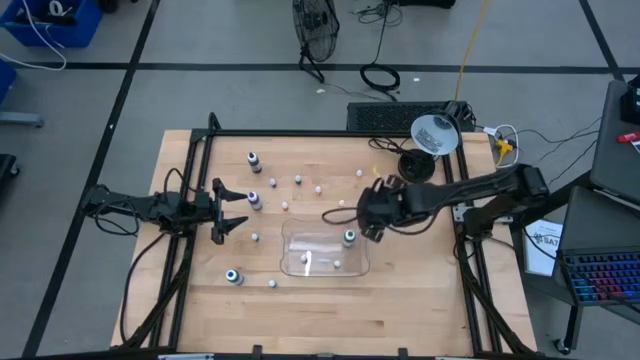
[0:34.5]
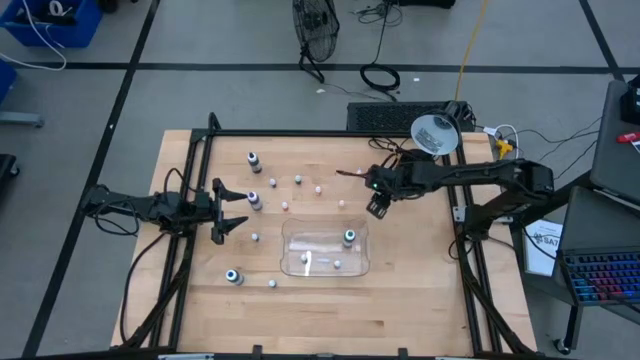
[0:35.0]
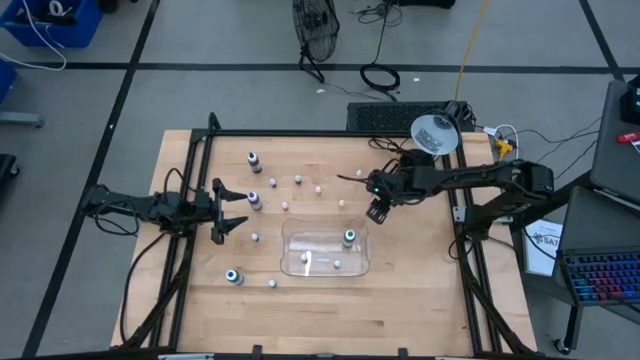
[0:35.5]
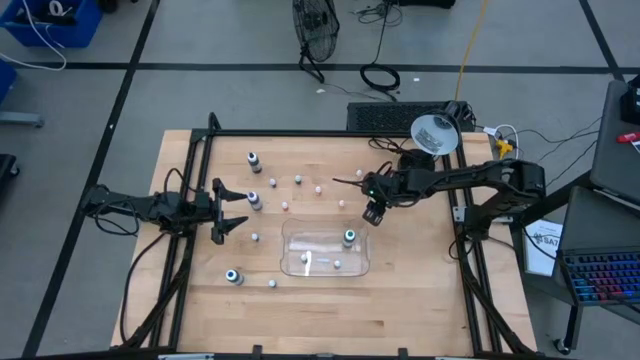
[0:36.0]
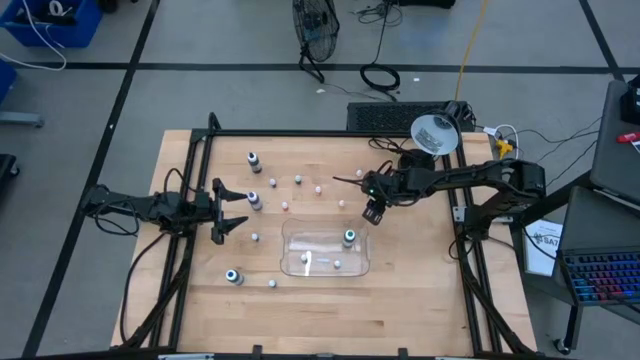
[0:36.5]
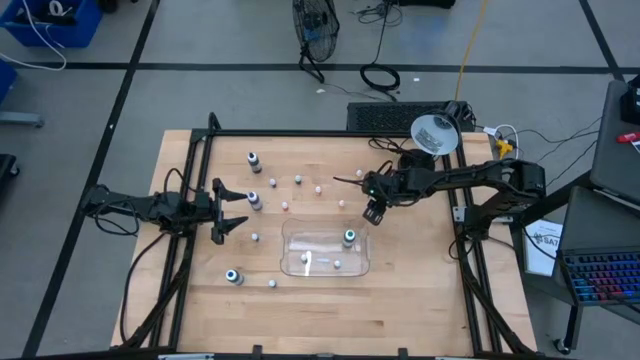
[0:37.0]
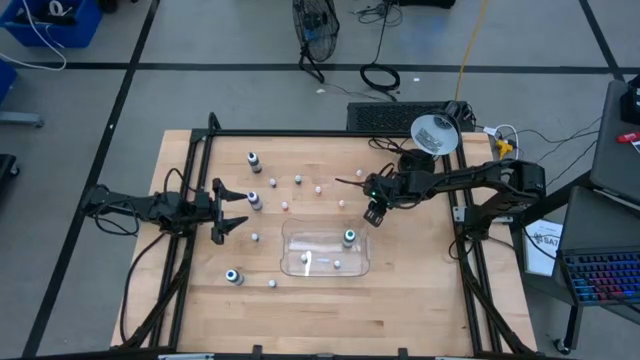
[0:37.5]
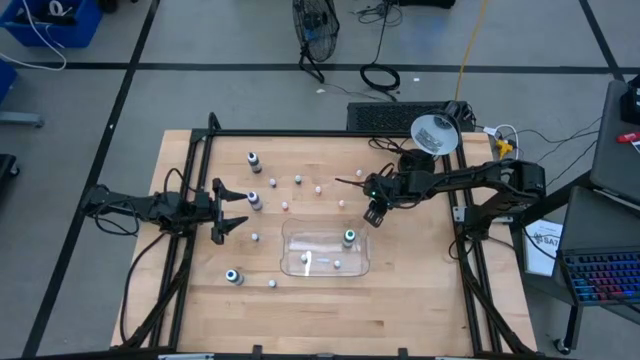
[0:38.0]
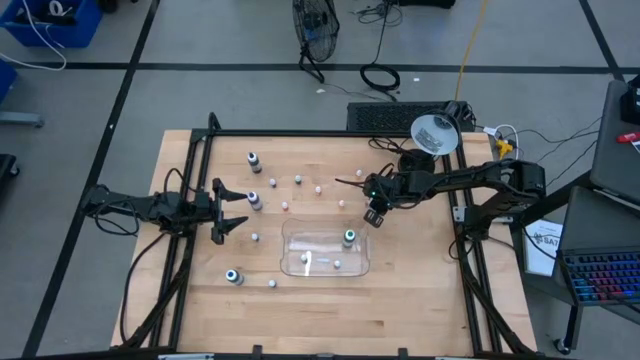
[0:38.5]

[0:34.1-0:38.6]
Task: Pick & Place food coloring
Put the small blue food coloring bottle into the bin

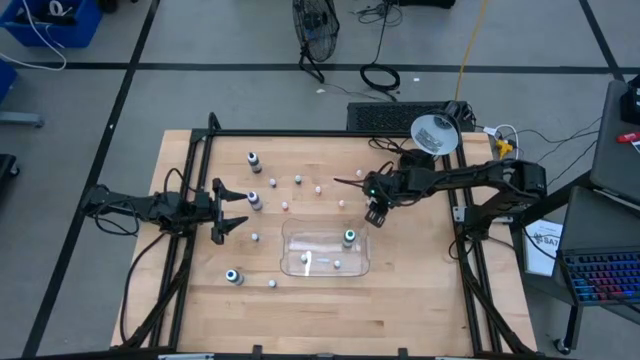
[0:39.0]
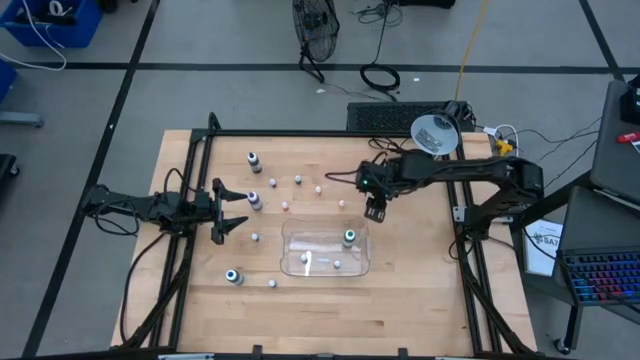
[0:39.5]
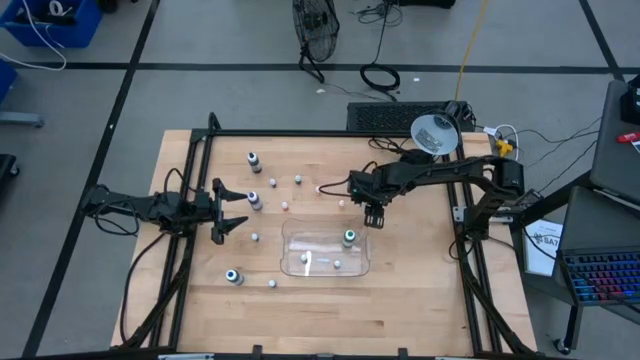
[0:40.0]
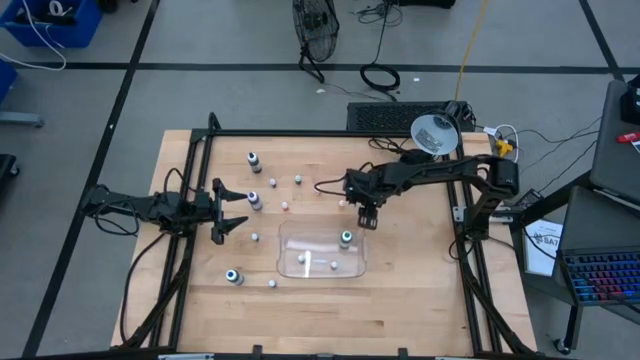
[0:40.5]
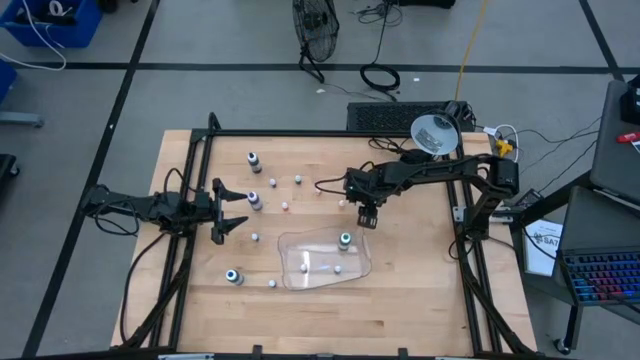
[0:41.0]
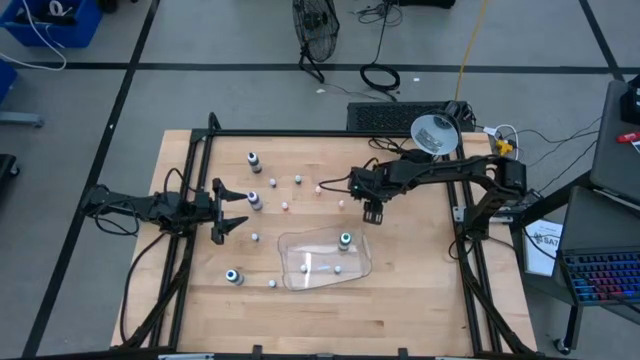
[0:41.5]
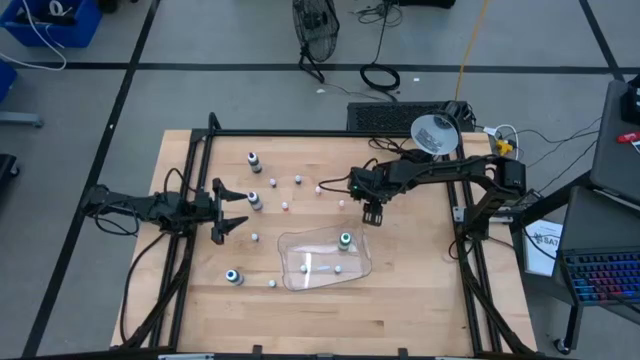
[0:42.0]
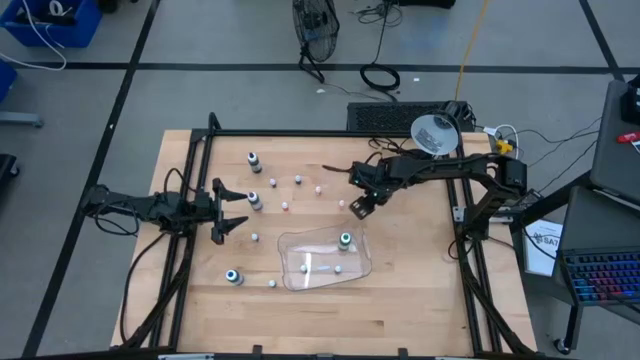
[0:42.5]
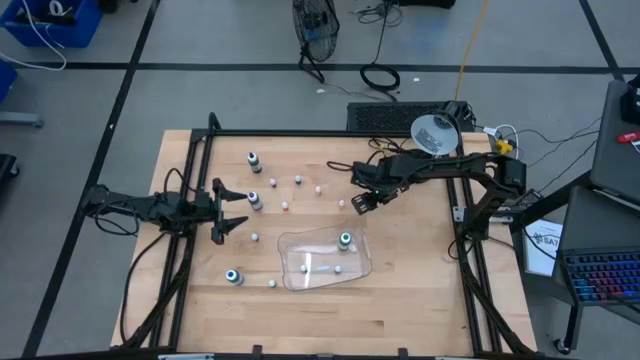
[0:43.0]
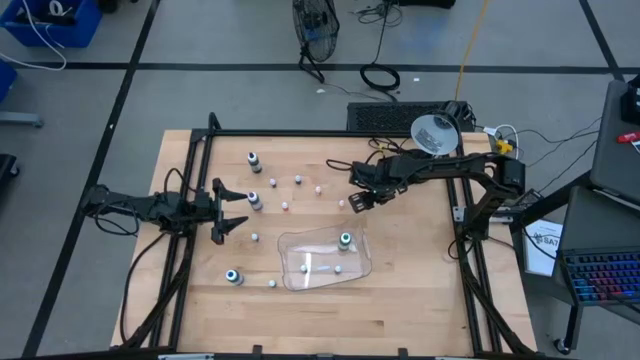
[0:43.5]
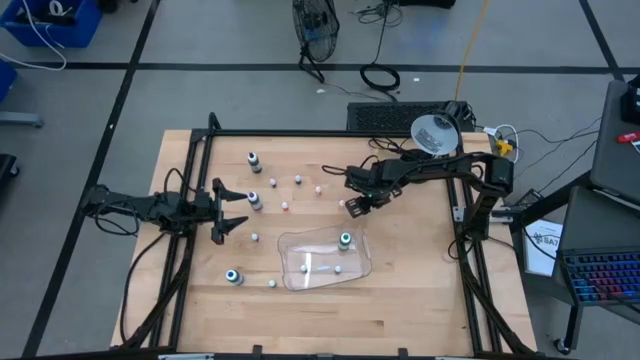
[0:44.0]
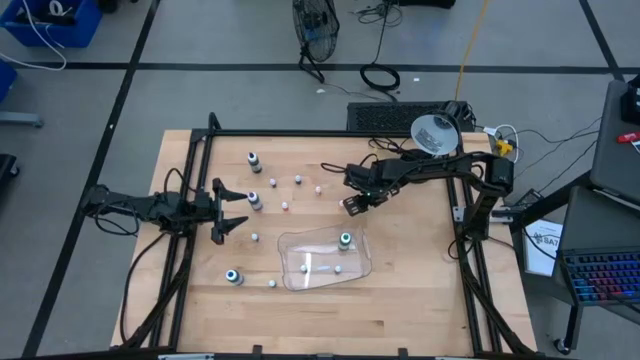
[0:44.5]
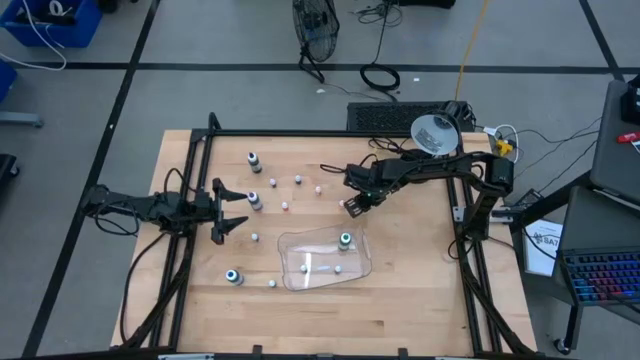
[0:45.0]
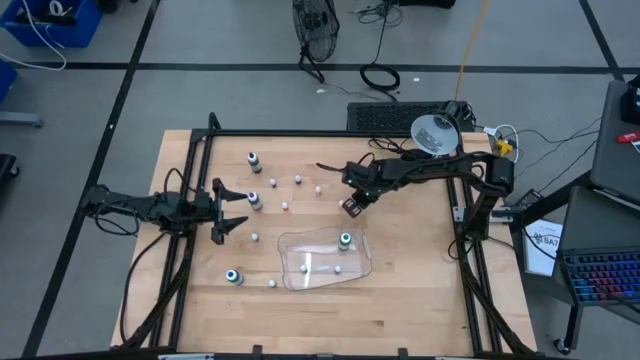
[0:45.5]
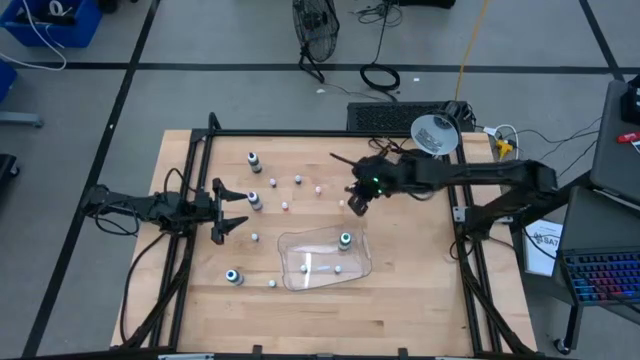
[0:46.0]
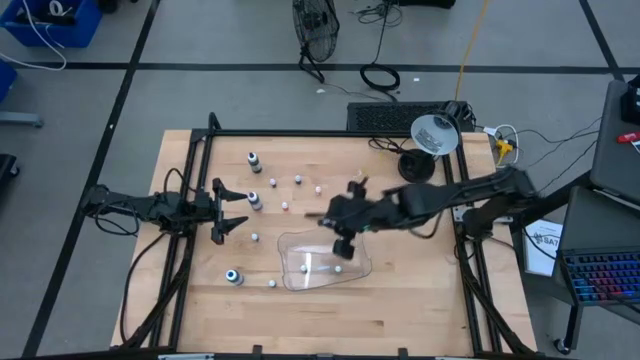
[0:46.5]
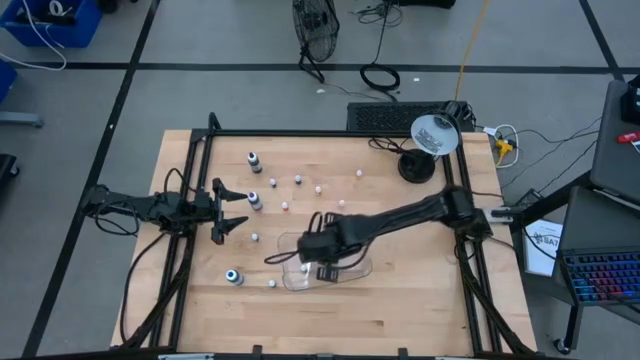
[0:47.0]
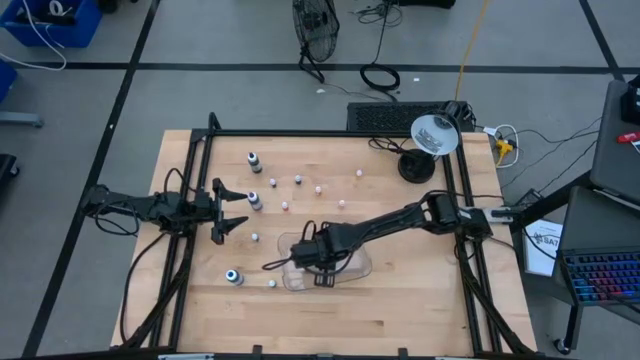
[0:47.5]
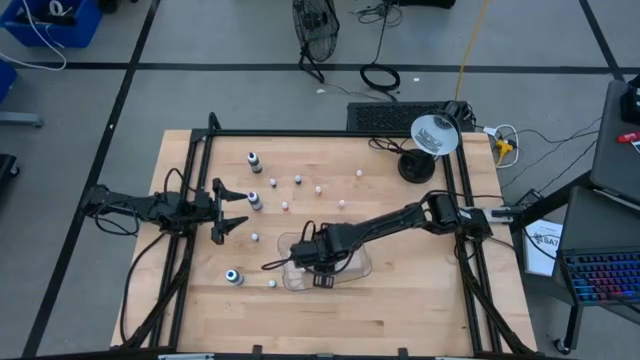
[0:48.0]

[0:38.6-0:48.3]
Put the small blue food coloring bottle into the bin

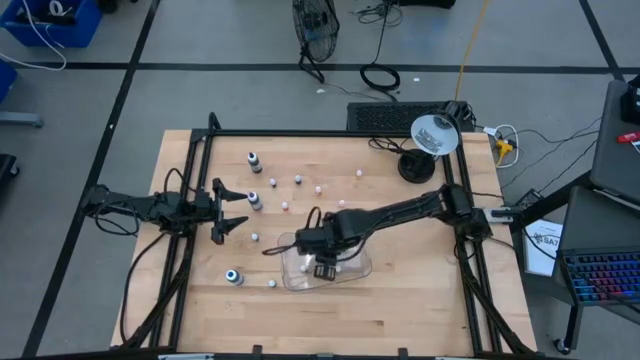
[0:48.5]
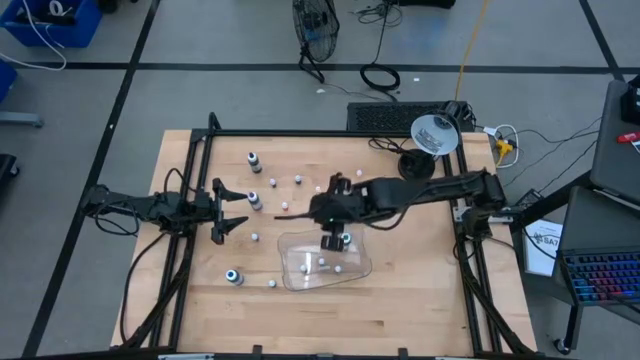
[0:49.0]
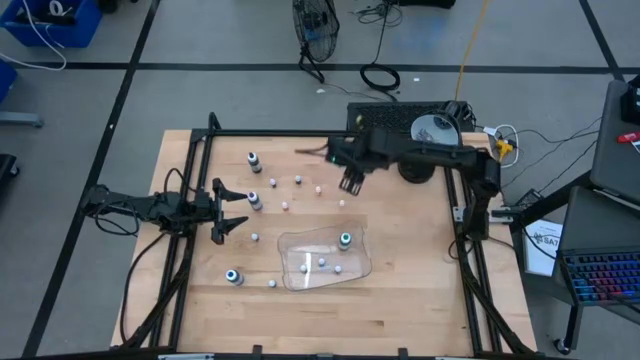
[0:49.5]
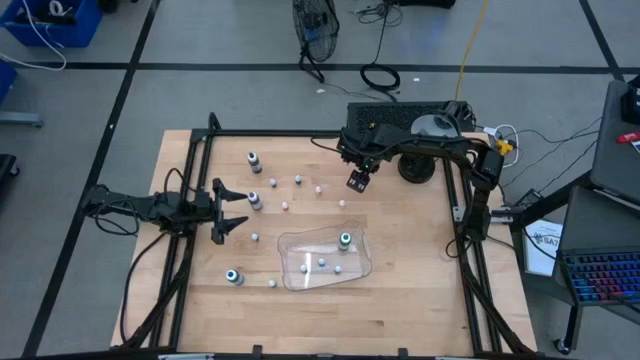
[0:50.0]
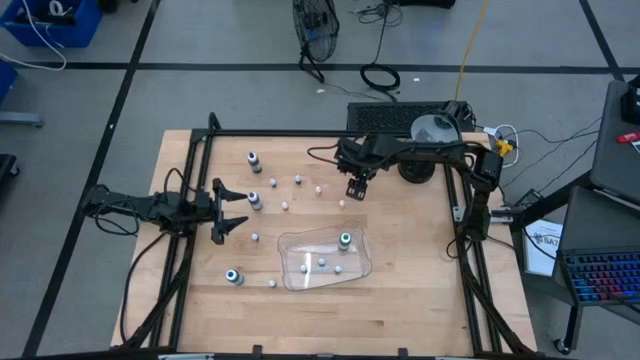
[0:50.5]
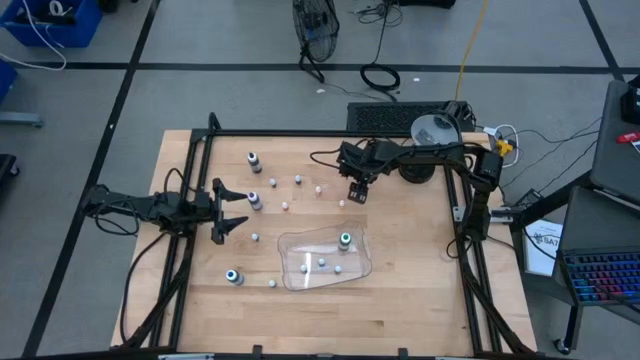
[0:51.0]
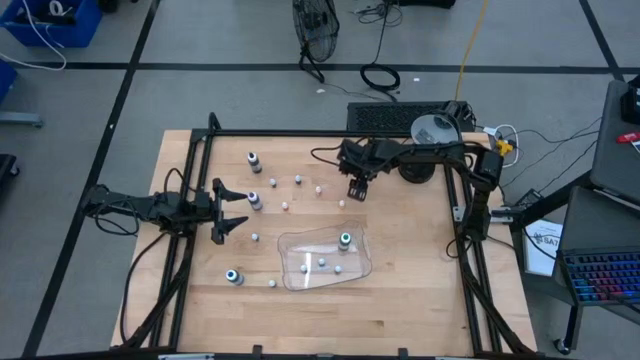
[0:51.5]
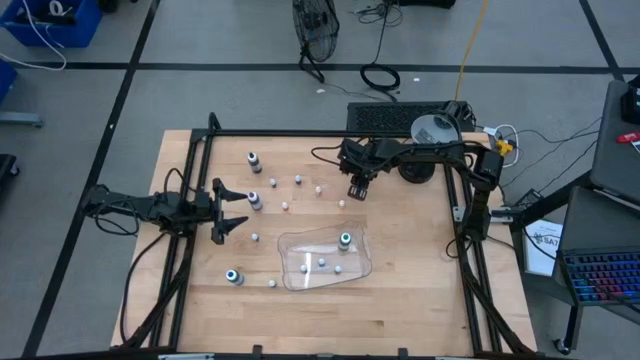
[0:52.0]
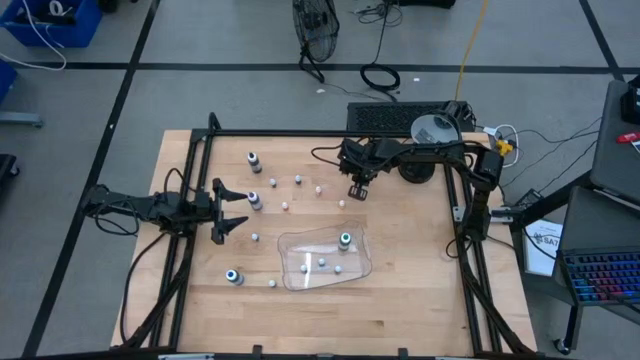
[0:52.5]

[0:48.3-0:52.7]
Put the small orange food coloring bottle into the bin

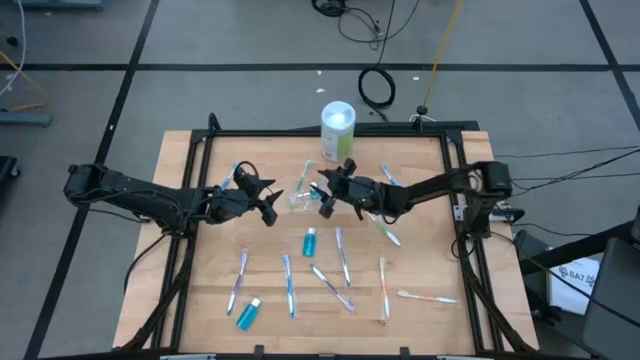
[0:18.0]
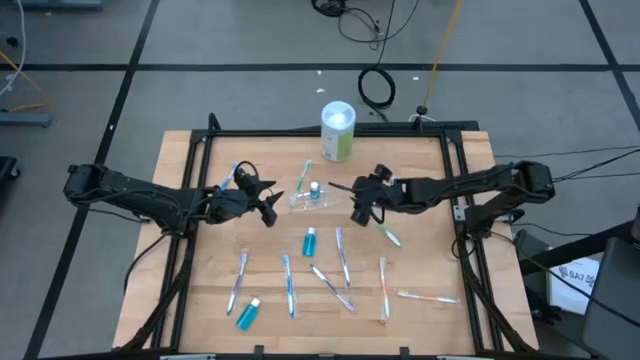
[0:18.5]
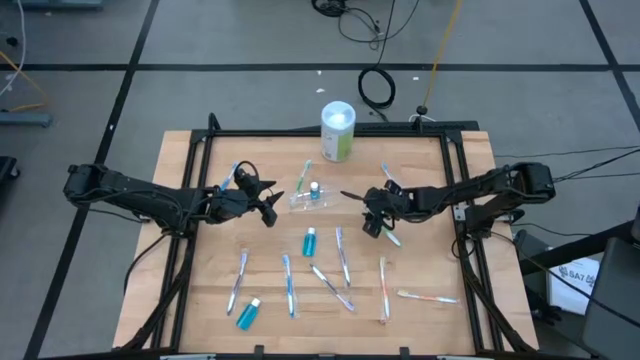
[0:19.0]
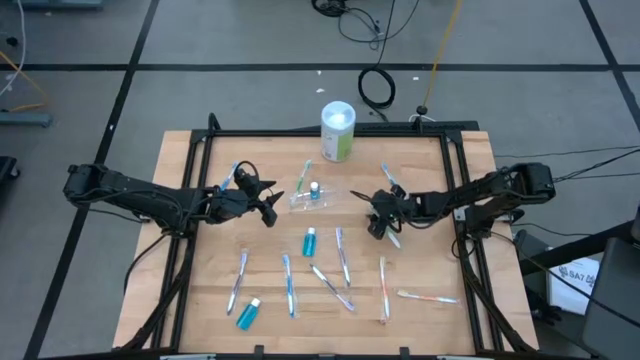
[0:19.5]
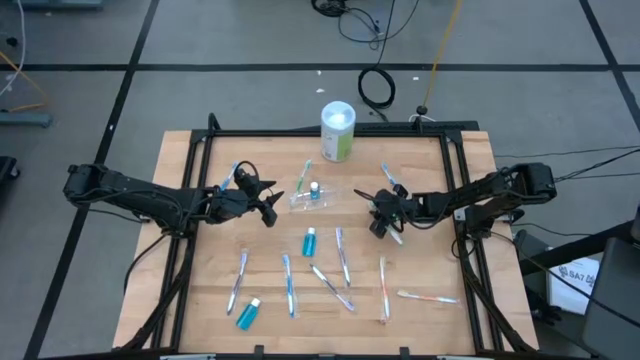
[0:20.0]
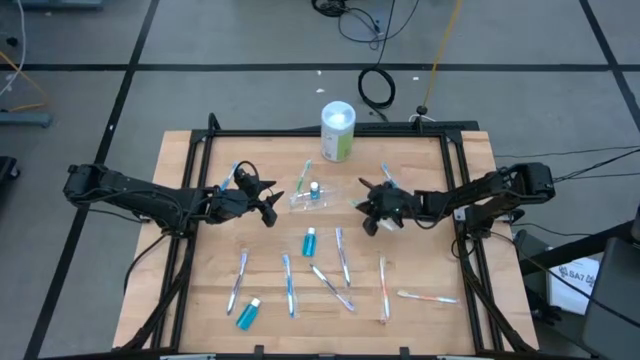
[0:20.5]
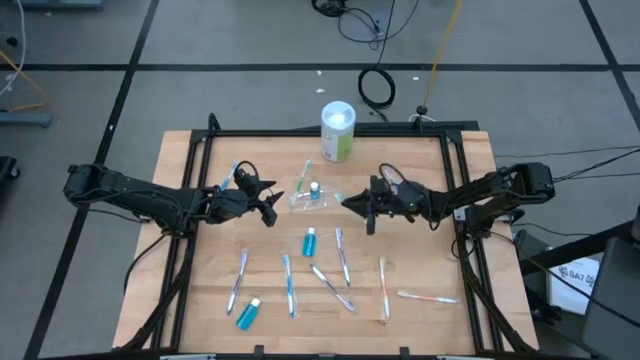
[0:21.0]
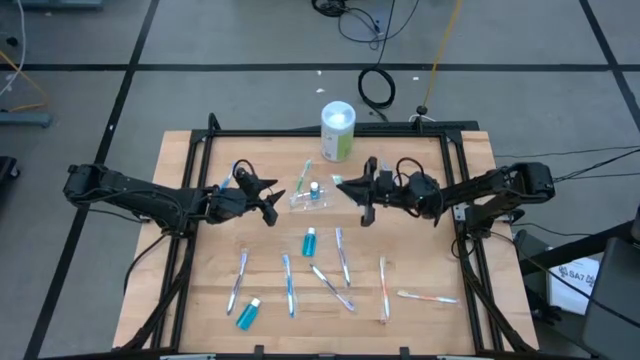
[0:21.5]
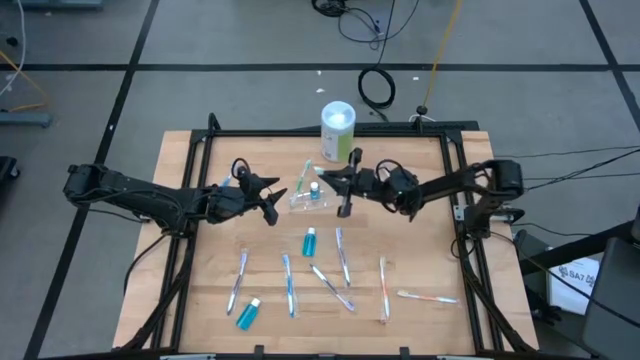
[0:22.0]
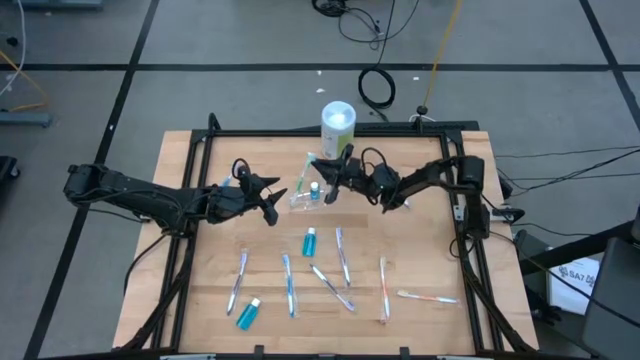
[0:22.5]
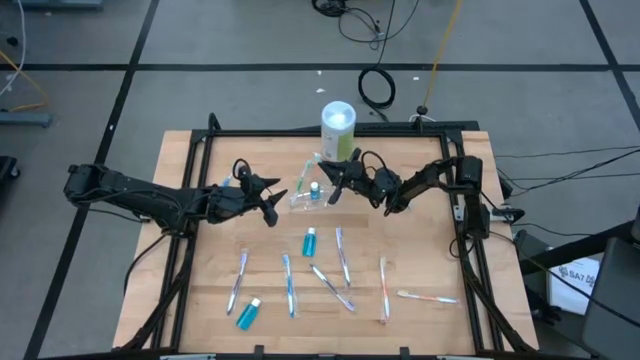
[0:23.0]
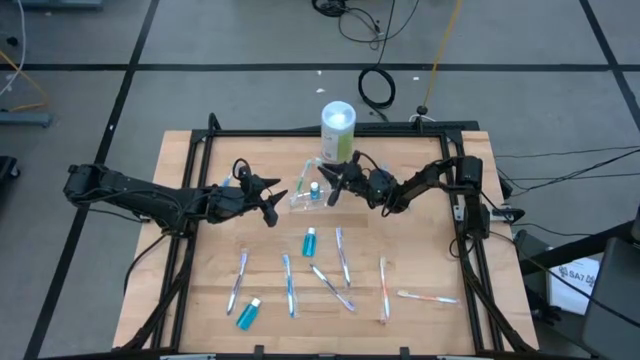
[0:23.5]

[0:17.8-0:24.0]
Task: Pick & Place toothbrushing station
Put the green toothbrush into the transparent organizer
